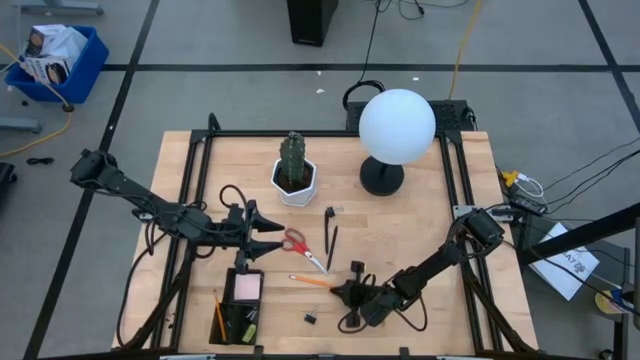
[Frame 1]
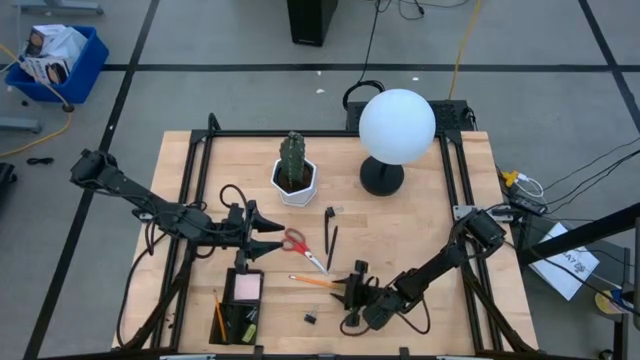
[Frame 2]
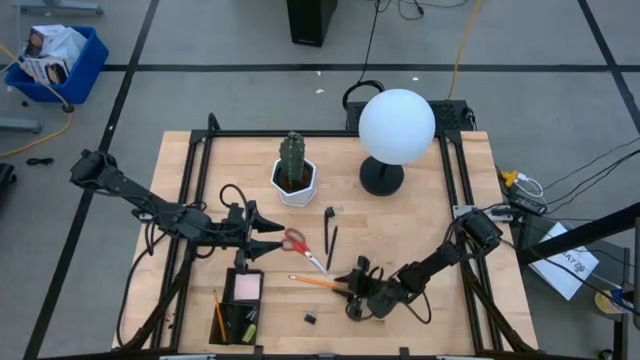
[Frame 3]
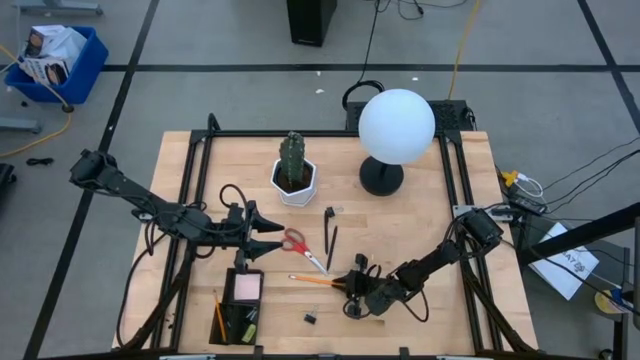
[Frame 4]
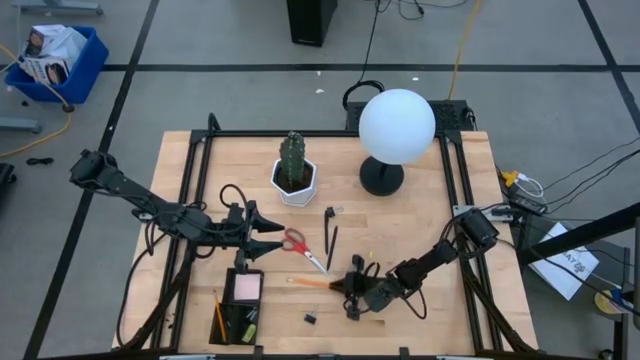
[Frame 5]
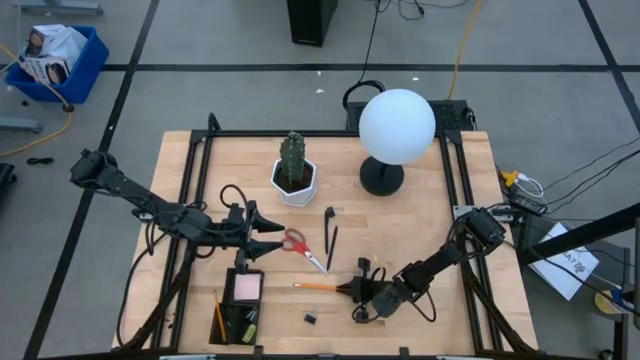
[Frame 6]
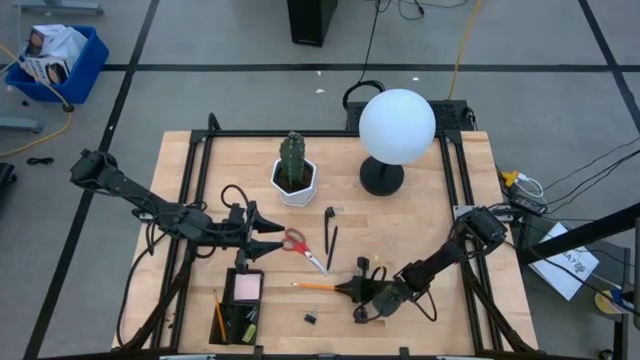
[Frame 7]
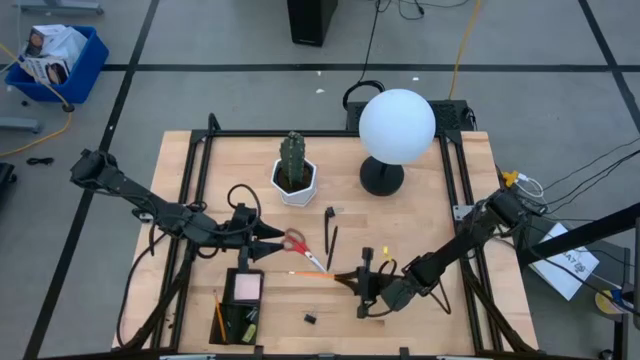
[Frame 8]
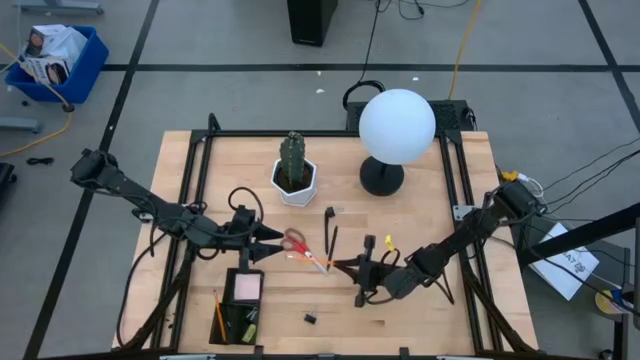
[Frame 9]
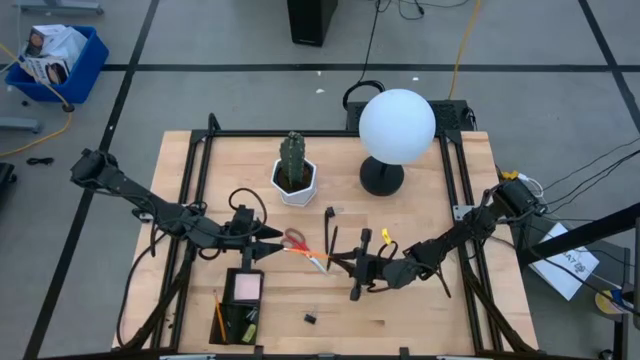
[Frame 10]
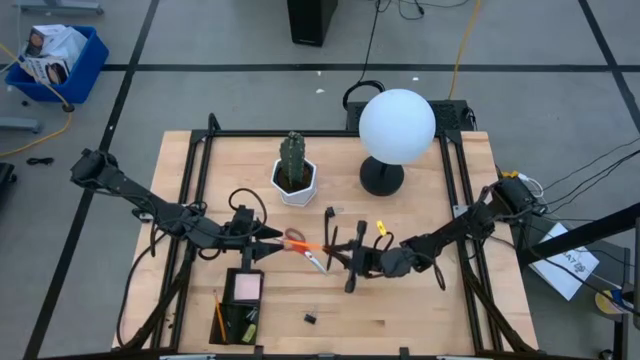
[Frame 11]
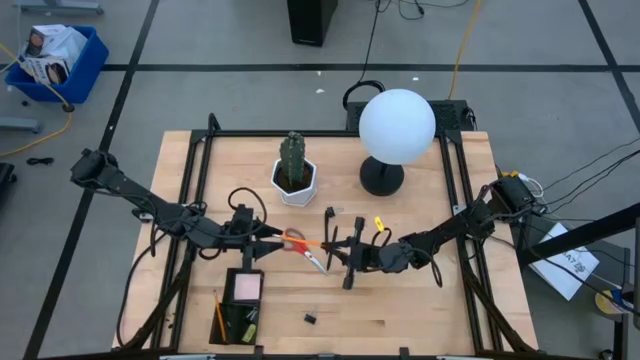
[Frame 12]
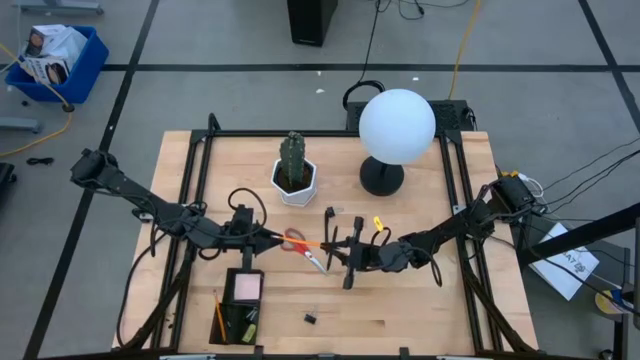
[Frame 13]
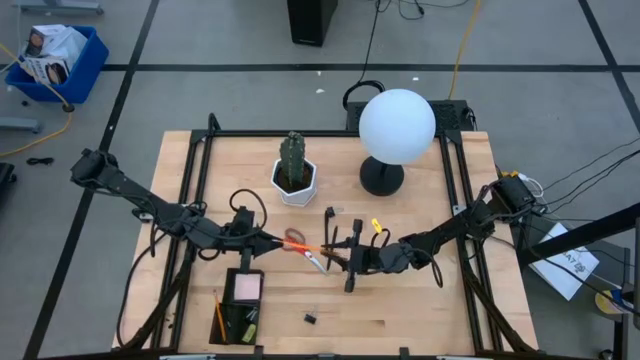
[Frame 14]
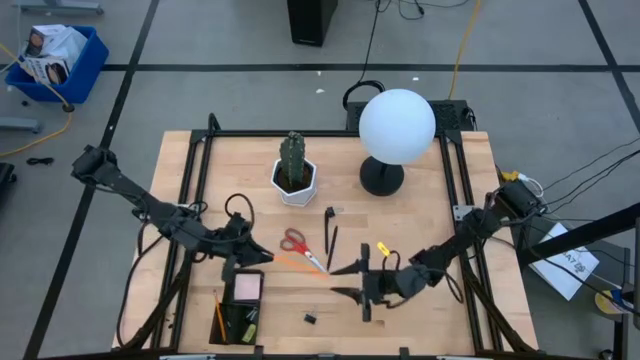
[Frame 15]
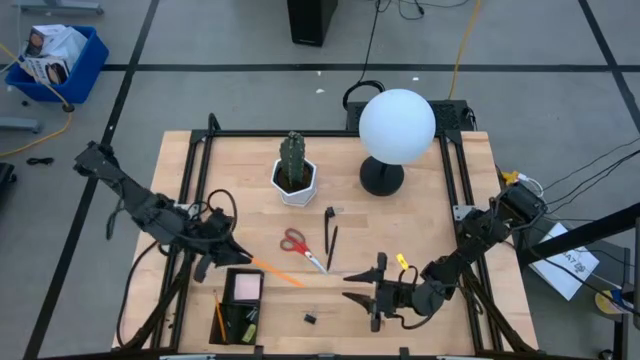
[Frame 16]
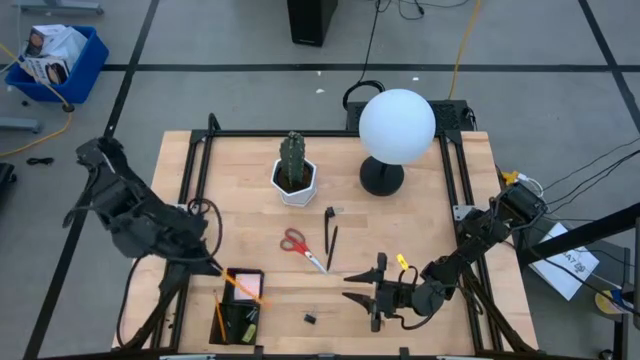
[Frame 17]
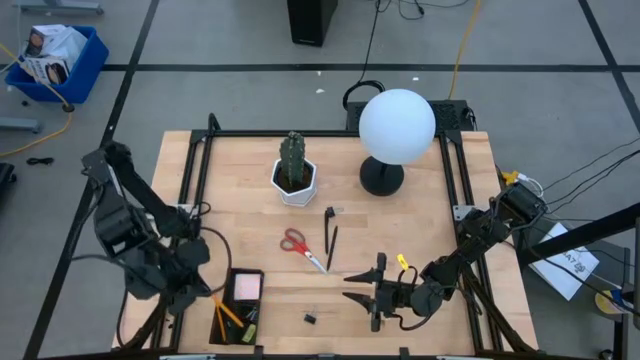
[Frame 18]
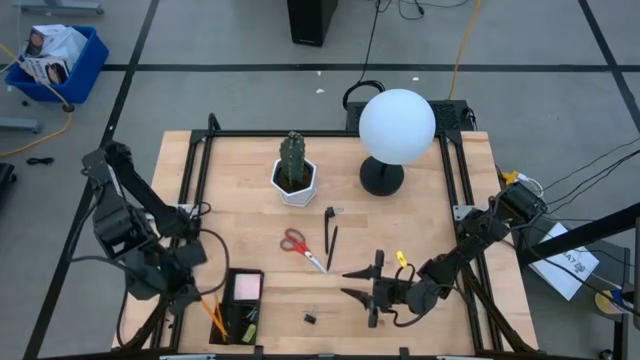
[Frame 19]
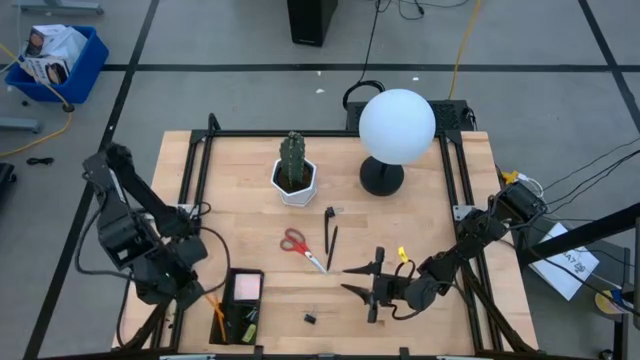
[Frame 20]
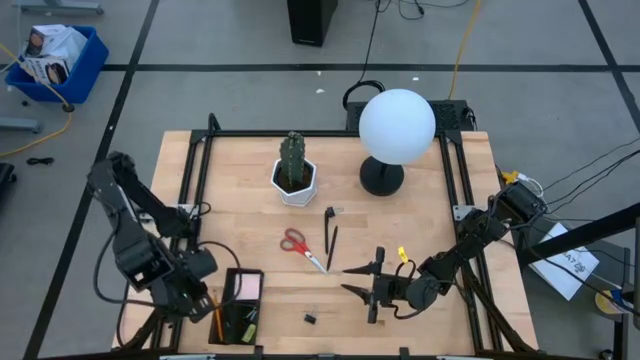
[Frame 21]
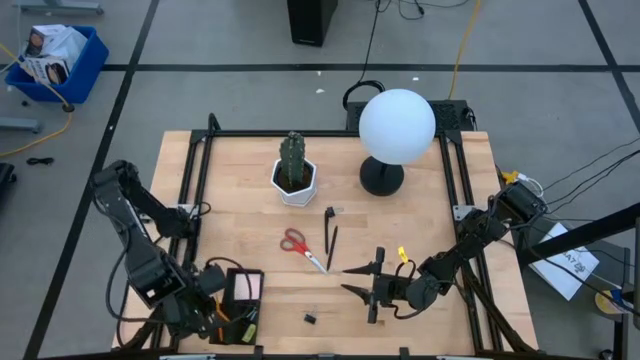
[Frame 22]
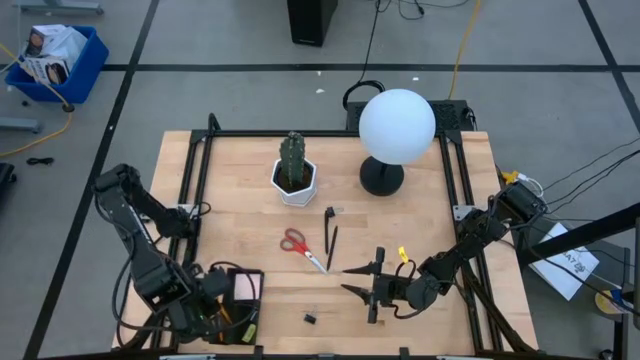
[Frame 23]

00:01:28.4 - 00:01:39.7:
Task: Pick and place office supplies into organizer
Put the pencil in the desk organizer

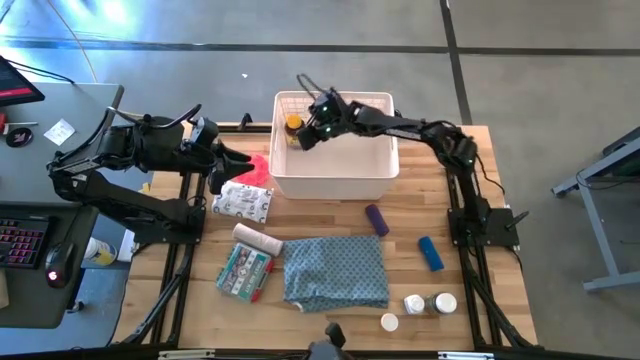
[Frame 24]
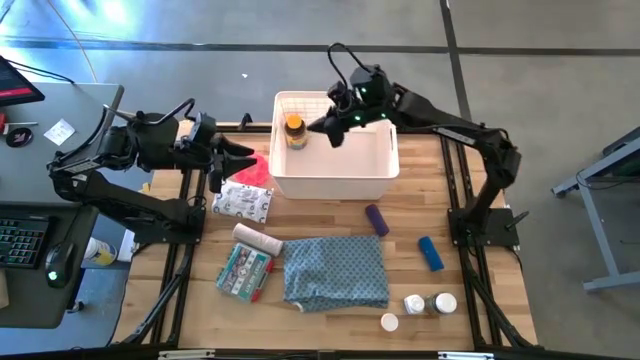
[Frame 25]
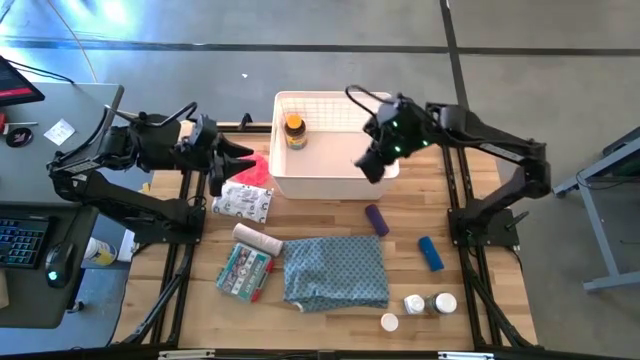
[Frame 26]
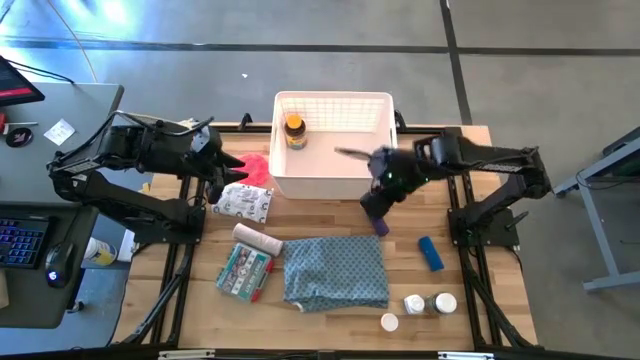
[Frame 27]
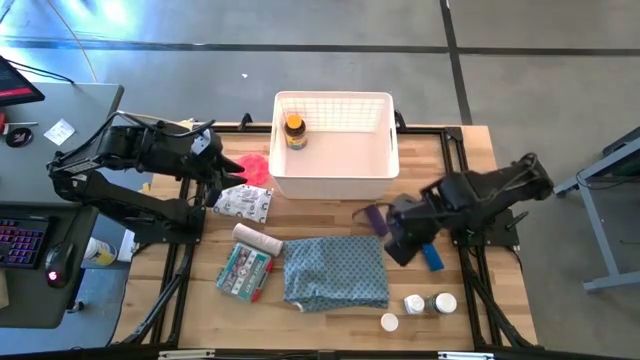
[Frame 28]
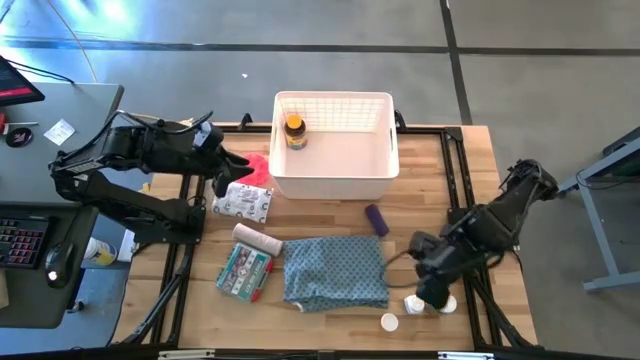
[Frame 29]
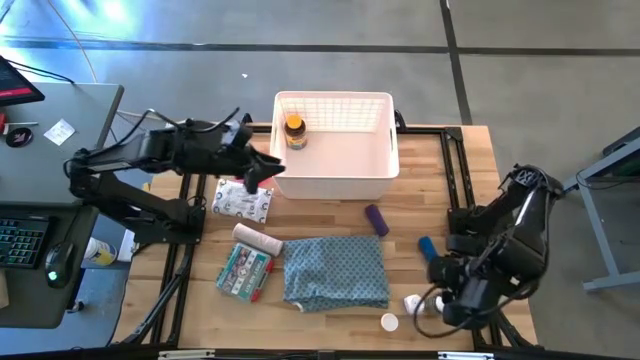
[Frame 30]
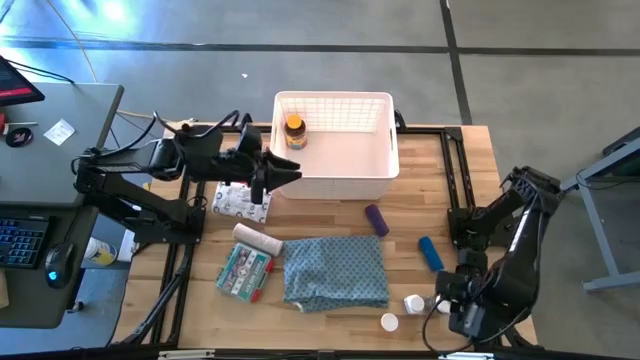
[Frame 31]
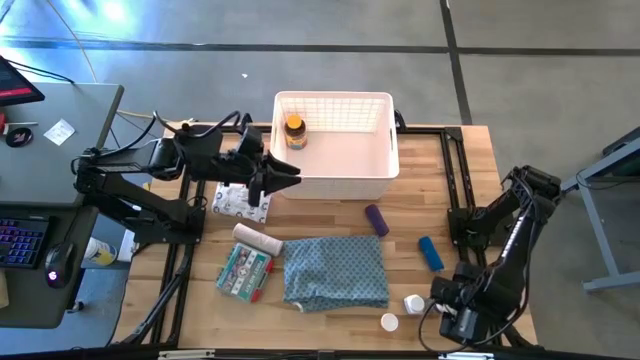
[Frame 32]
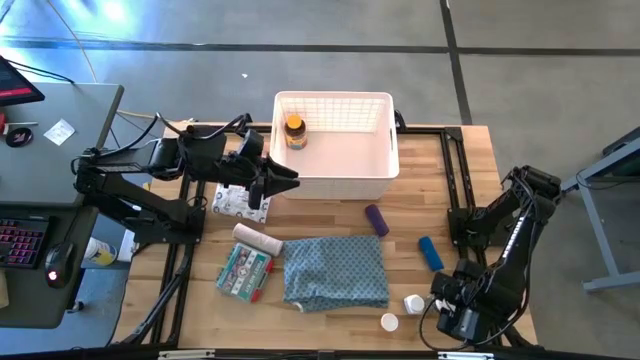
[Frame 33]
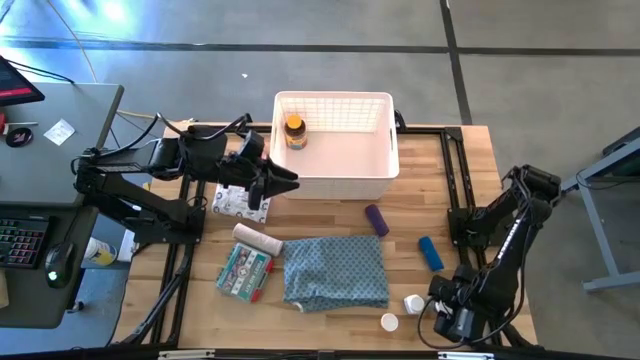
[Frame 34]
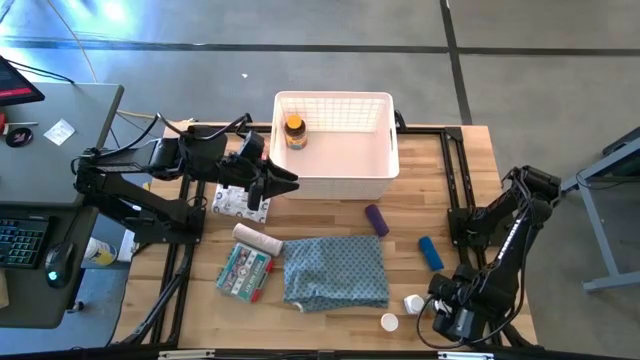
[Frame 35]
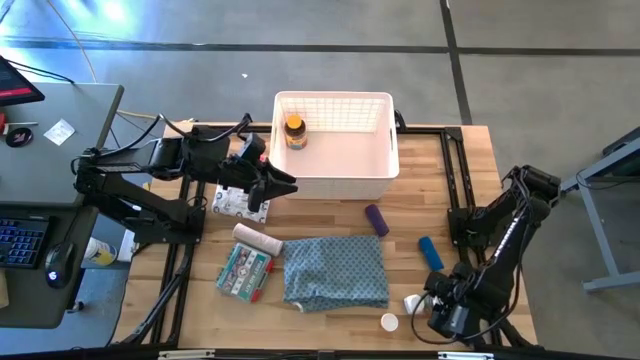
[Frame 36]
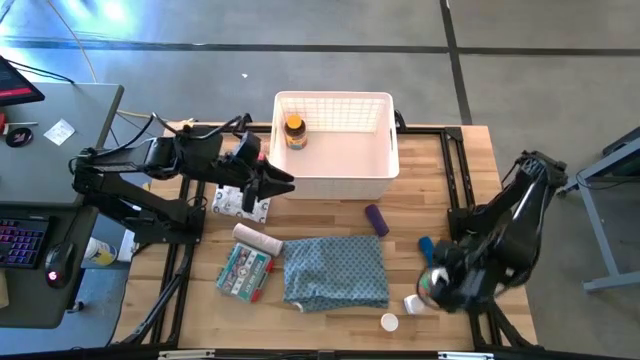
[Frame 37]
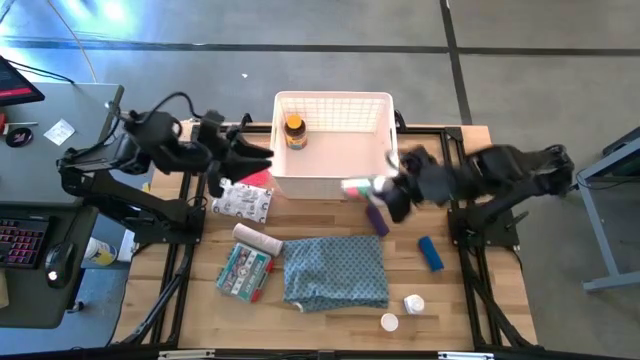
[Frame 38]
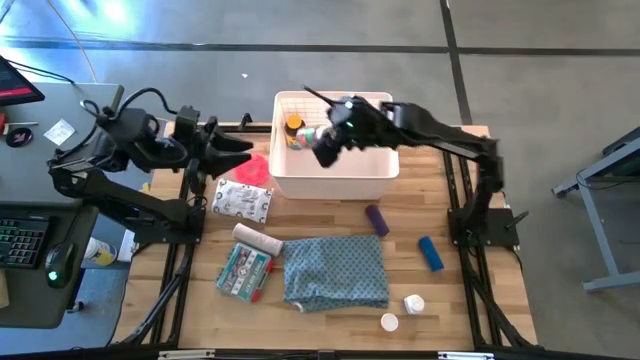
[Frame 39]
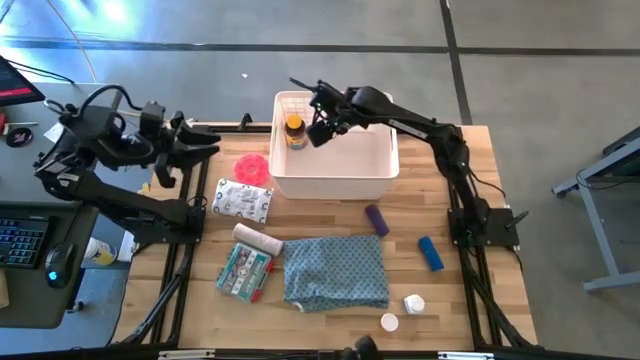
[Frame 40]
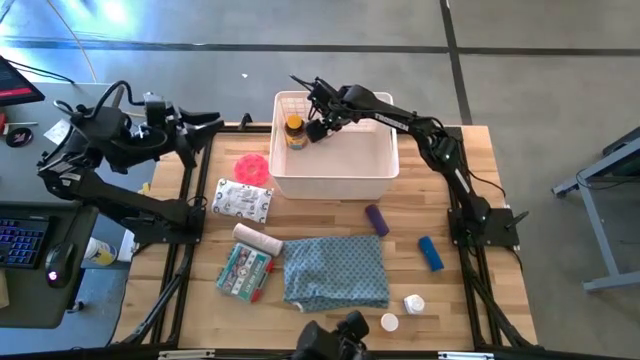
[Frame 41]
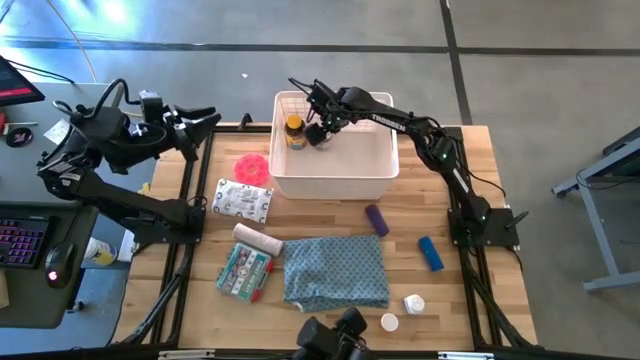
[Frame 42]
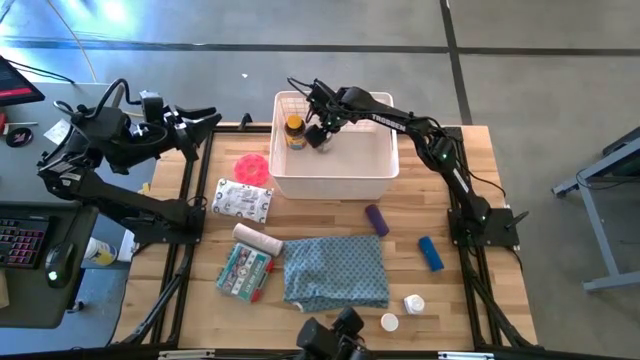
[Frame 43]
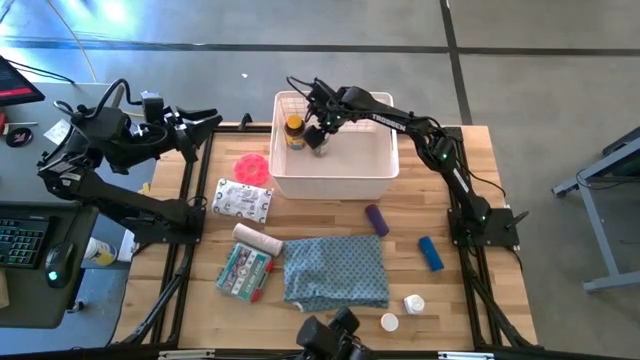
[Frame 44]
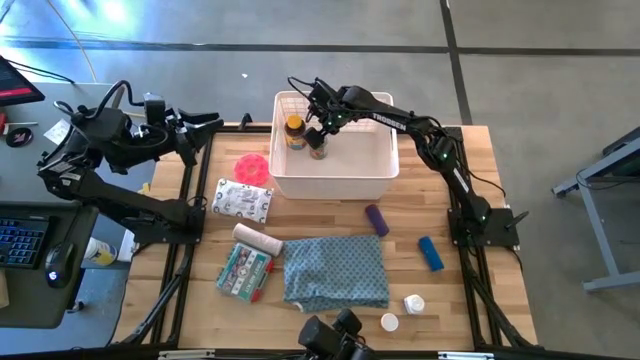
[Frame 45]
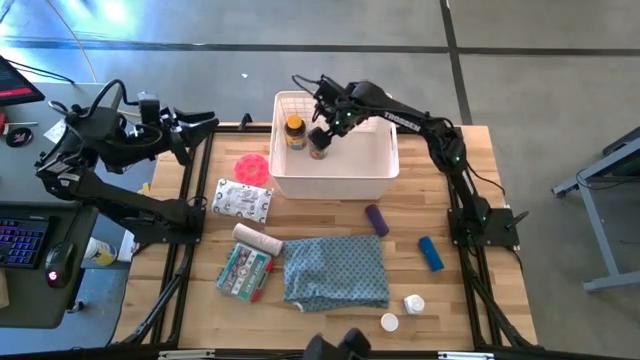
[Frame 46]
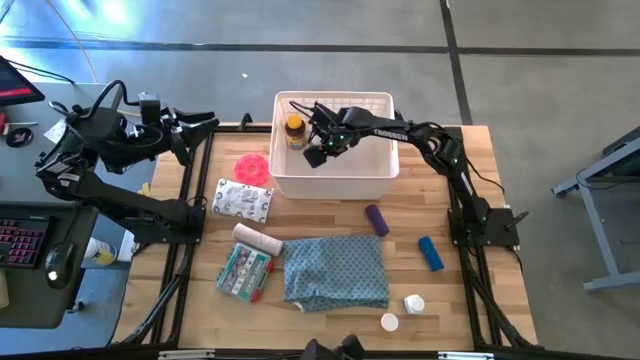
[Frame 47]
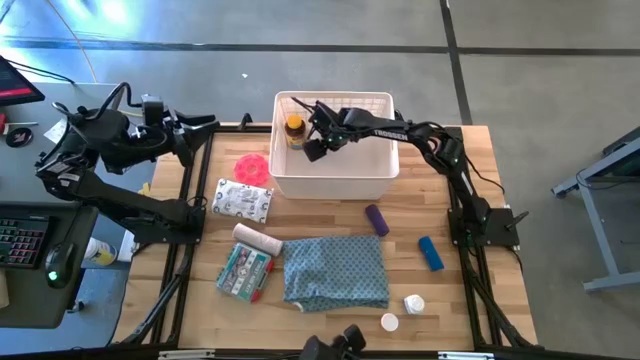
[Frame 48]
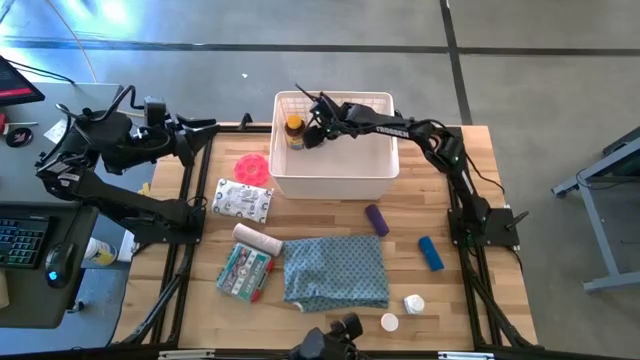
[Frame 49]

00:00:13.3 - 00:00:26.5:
Task: Pick & place medical supplies in basket/bin
Put the green pill bottle into the white bin
